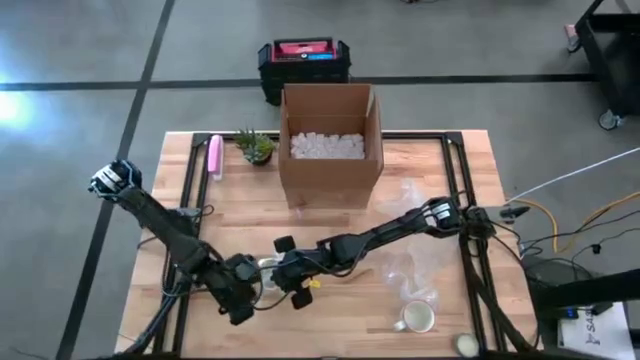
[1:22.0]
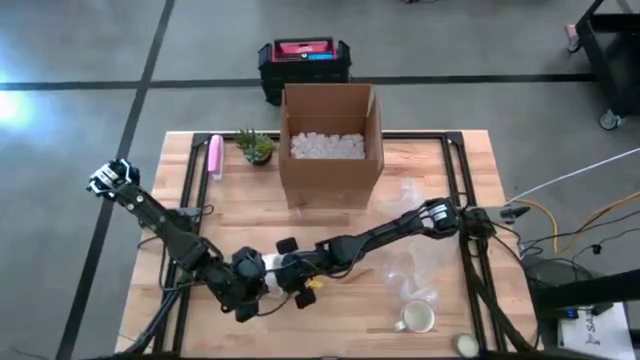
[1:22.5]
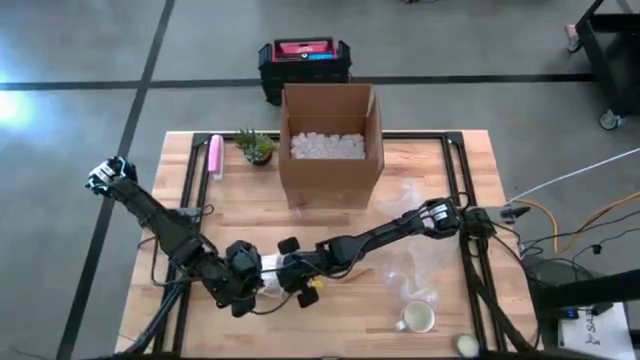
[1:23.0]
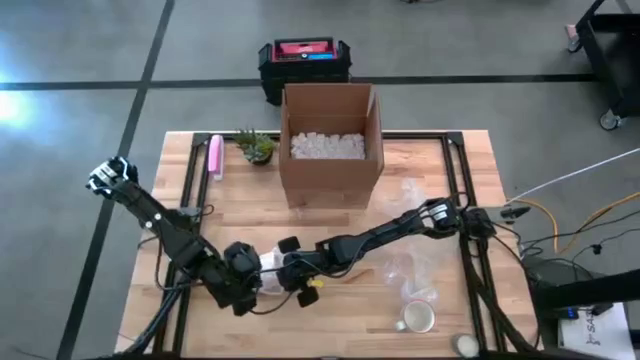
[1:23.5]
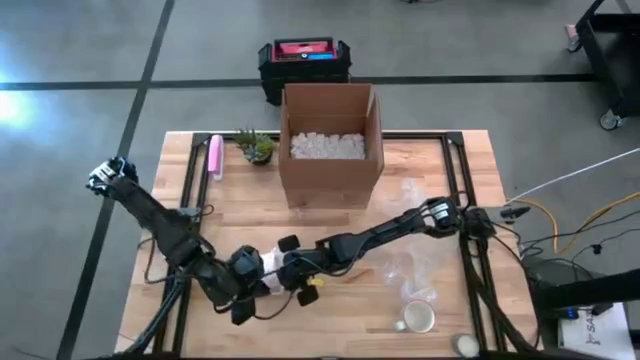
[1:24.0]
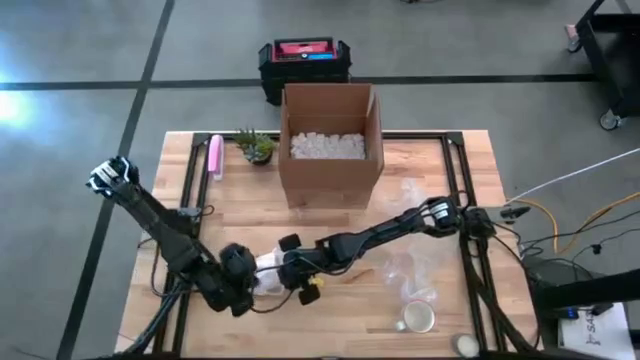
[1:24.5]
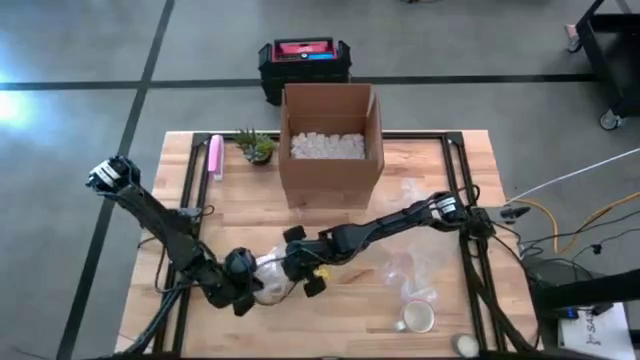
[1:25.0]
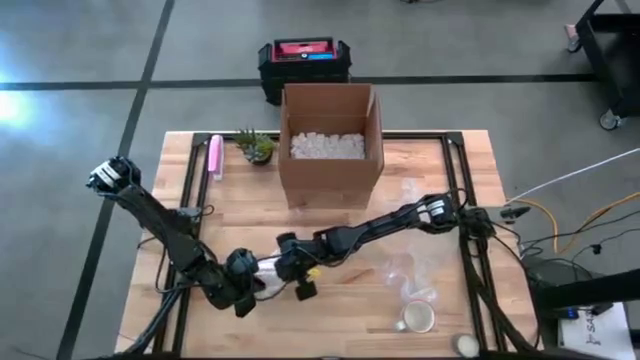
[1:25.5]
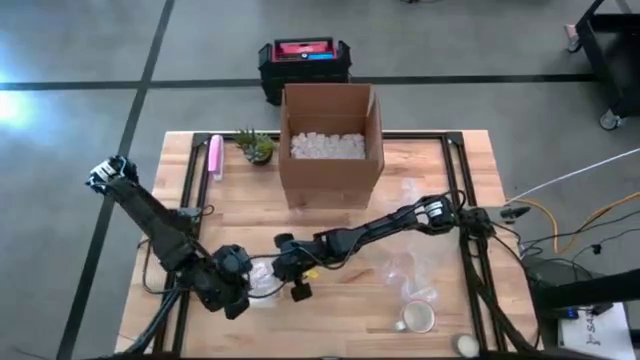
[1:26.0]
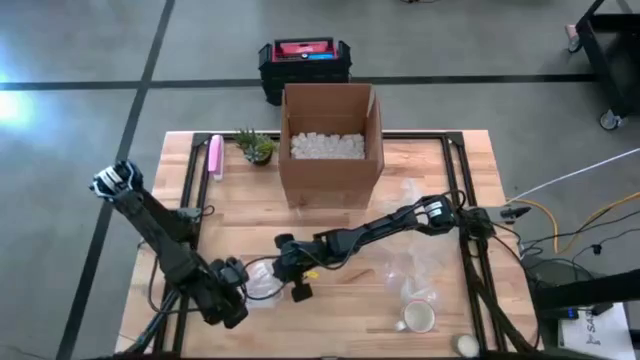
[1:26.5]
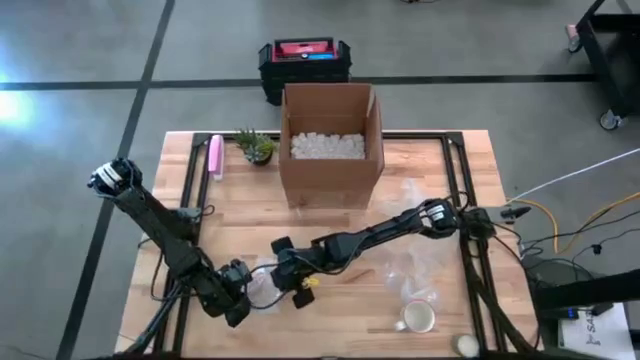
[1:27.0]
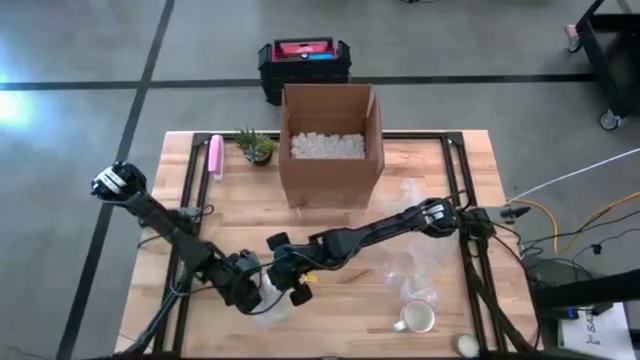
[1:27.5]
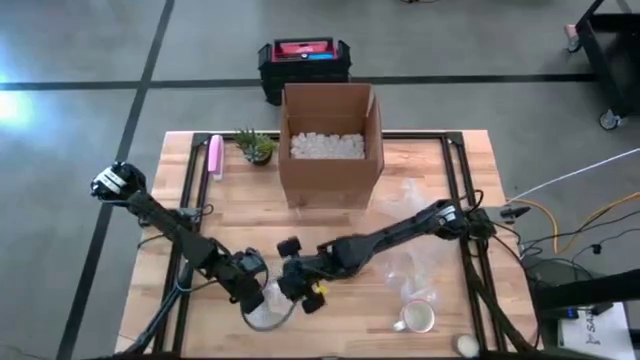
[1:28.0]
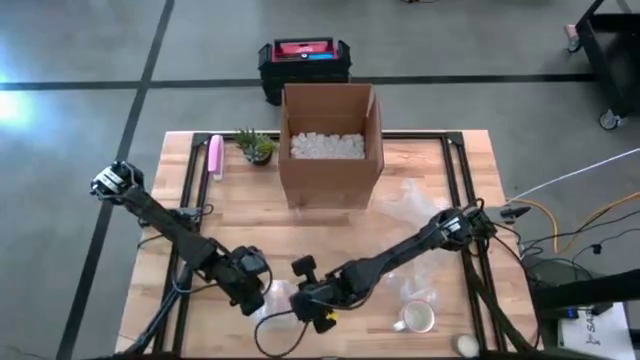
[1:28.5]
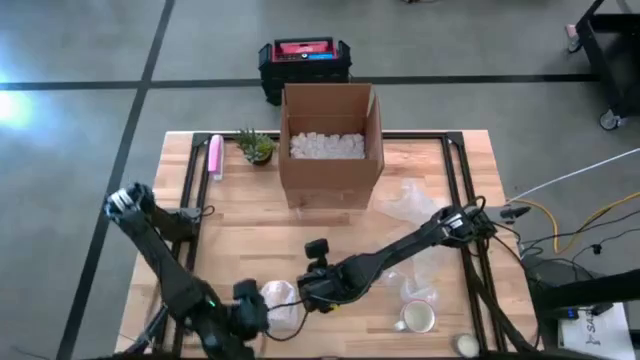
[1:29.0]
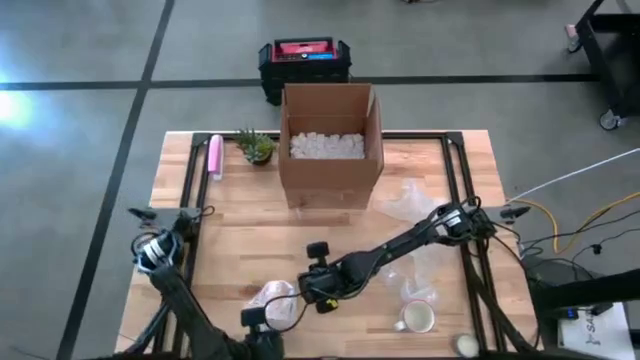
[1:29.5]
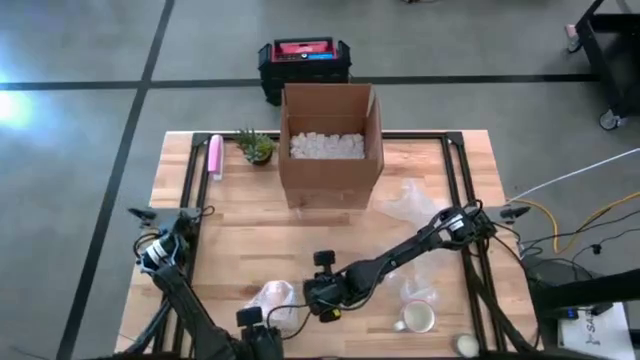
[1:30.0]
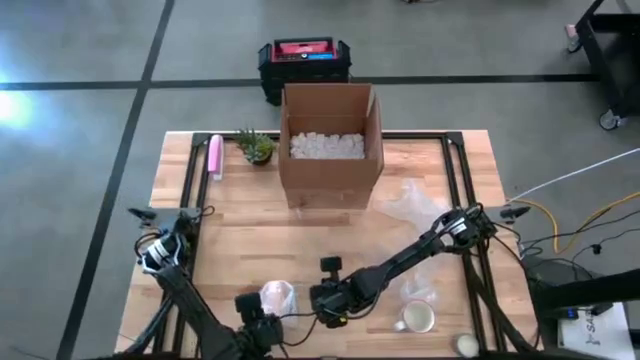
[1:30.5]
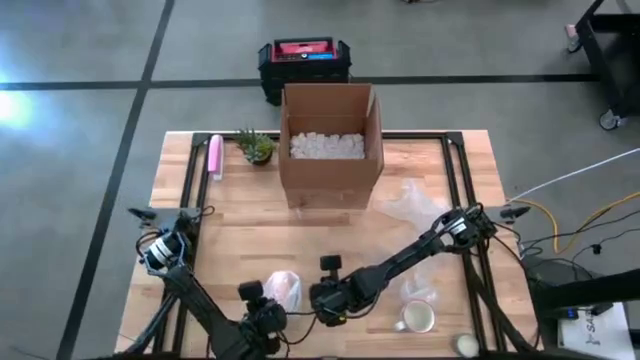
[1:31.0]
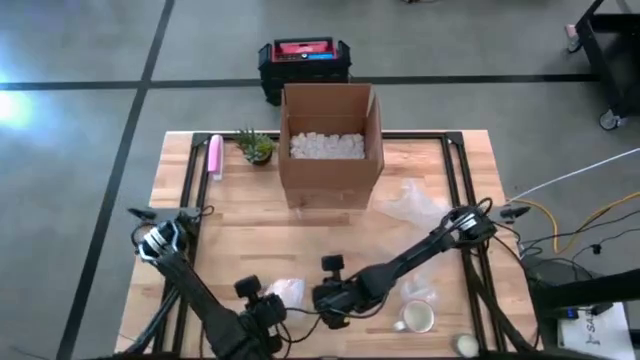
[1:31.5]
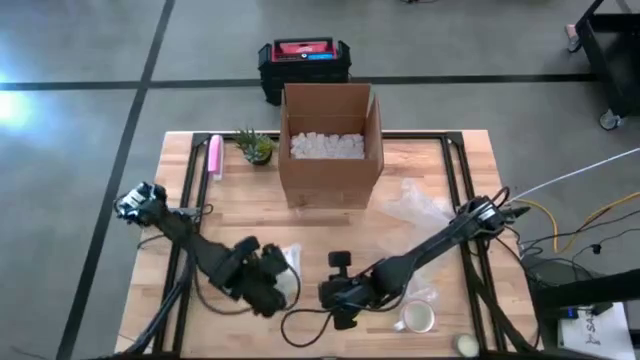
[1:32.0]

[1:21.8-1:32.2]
Task: wrap mug
Wrap the orange mug with the bubble wrap

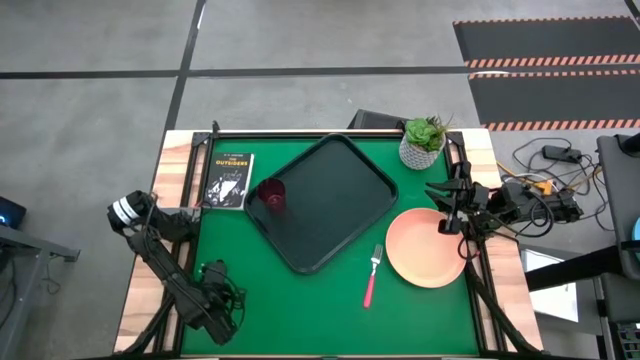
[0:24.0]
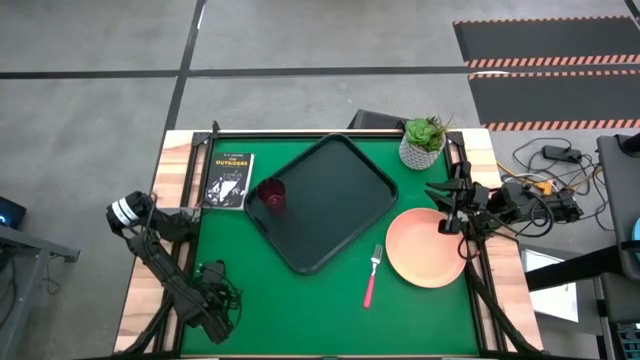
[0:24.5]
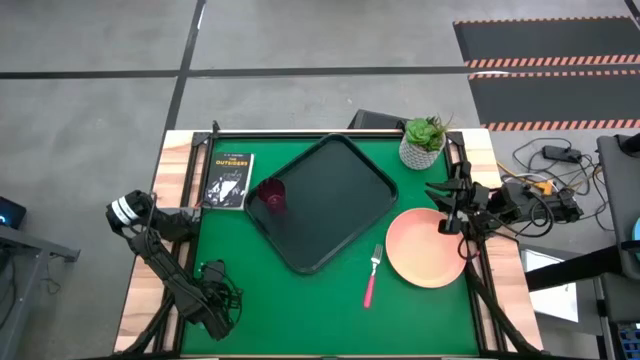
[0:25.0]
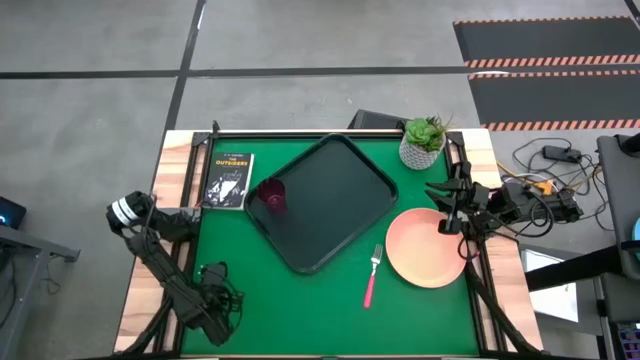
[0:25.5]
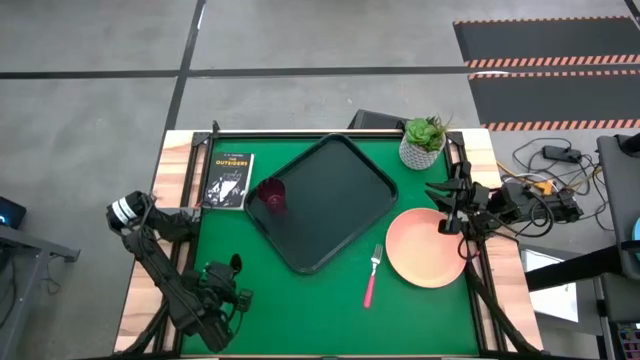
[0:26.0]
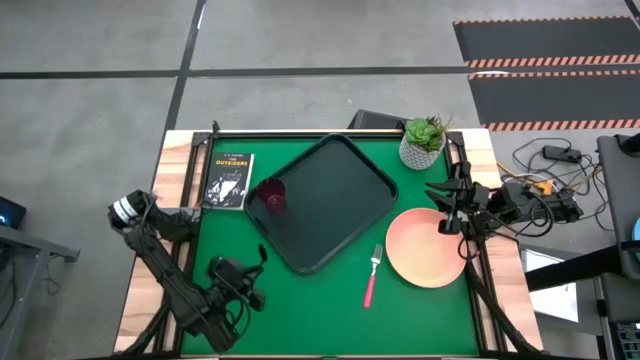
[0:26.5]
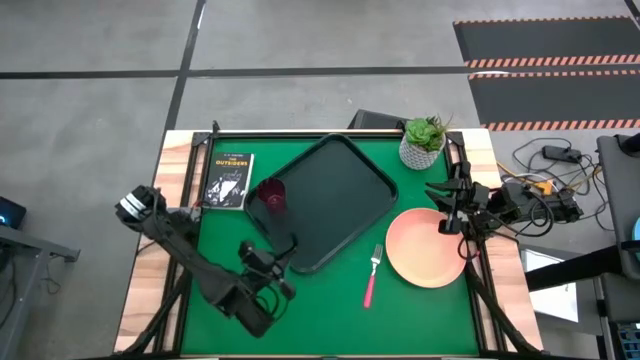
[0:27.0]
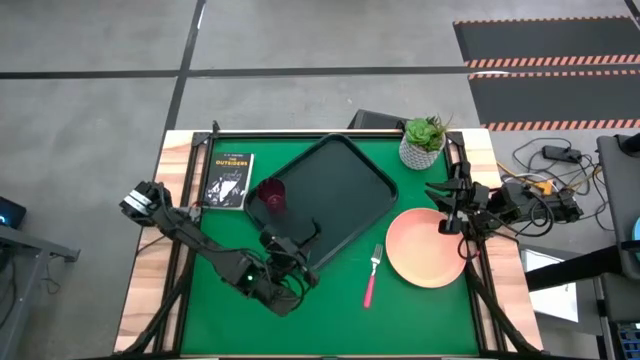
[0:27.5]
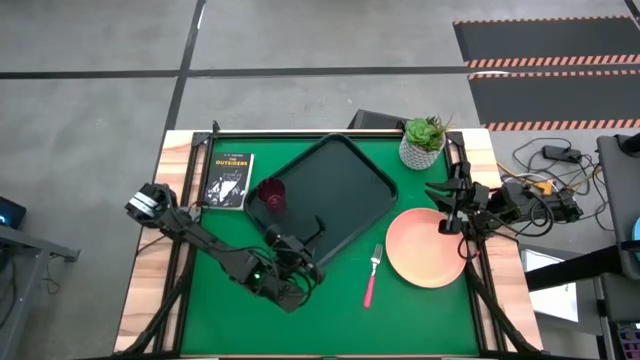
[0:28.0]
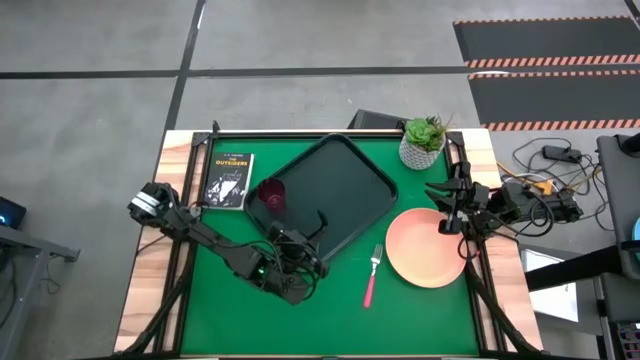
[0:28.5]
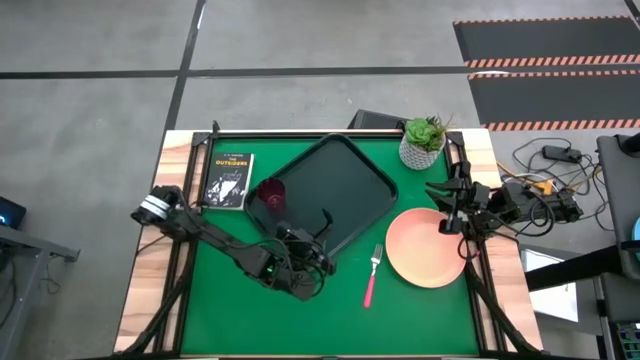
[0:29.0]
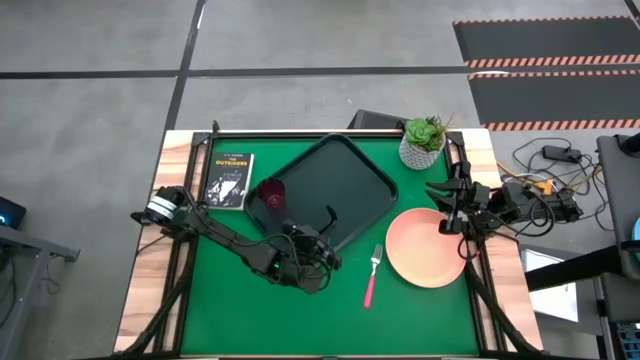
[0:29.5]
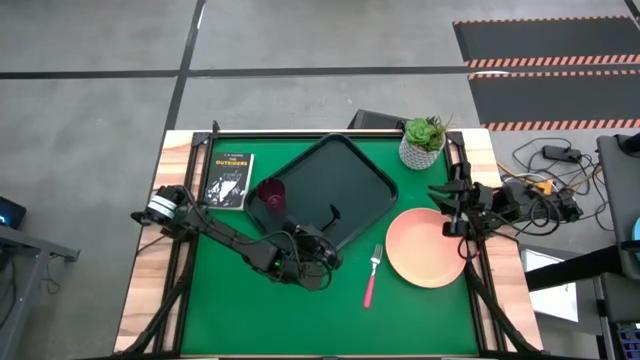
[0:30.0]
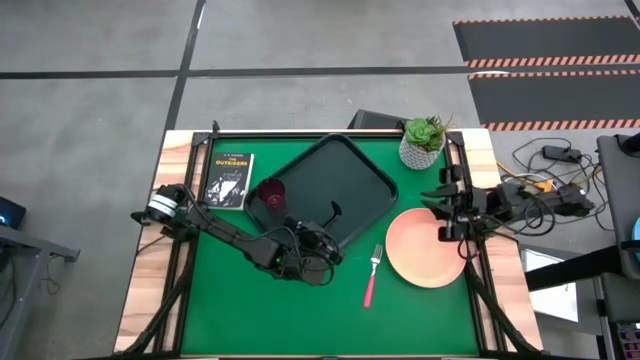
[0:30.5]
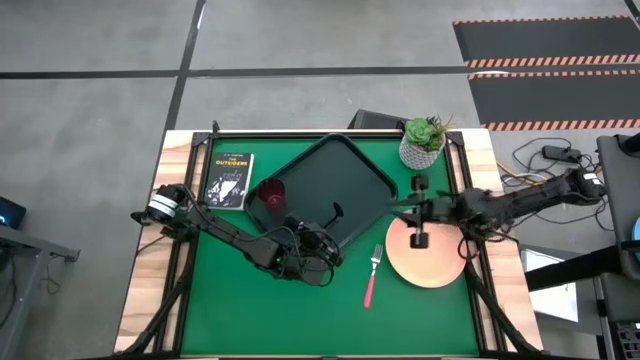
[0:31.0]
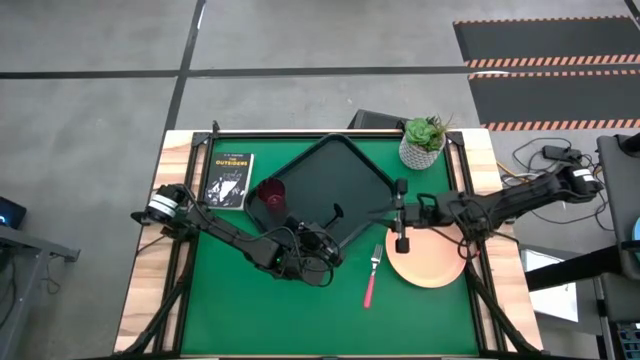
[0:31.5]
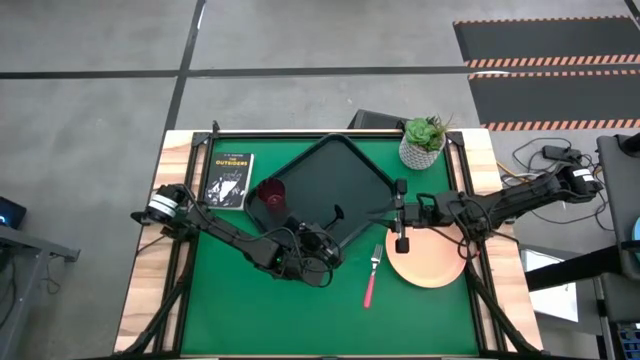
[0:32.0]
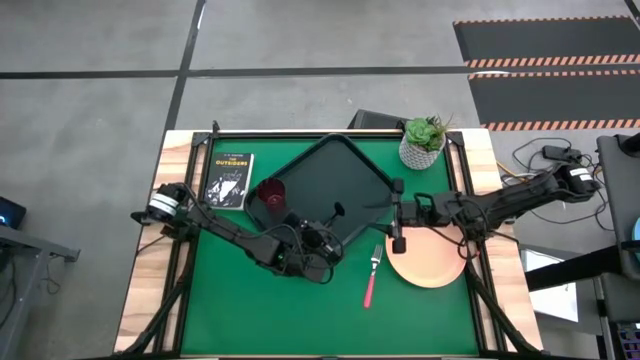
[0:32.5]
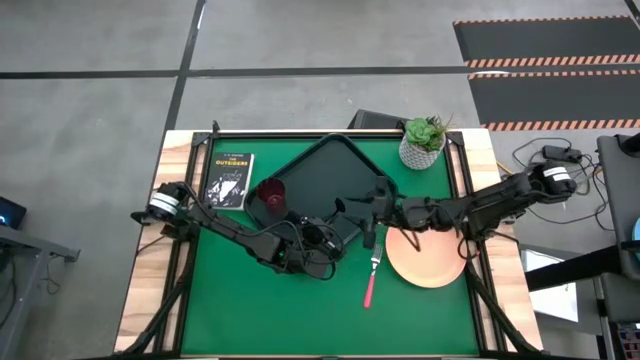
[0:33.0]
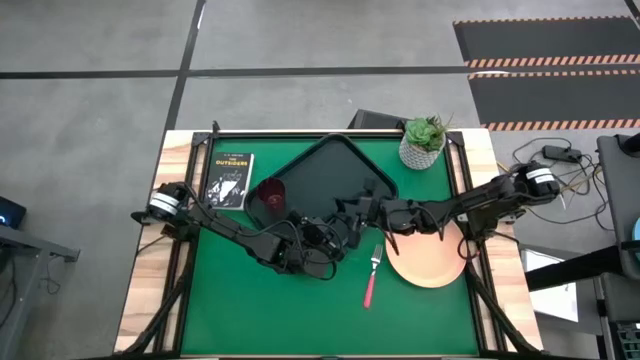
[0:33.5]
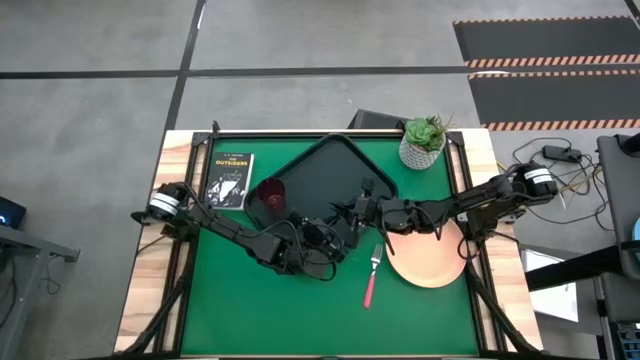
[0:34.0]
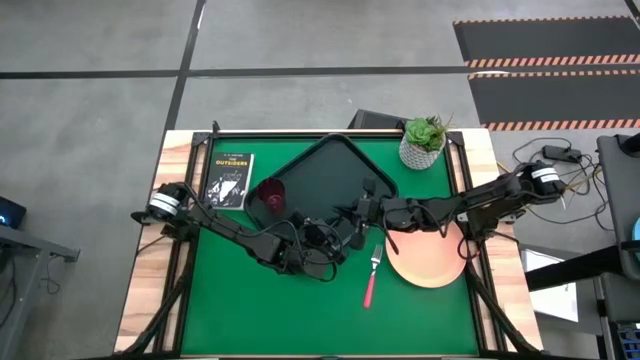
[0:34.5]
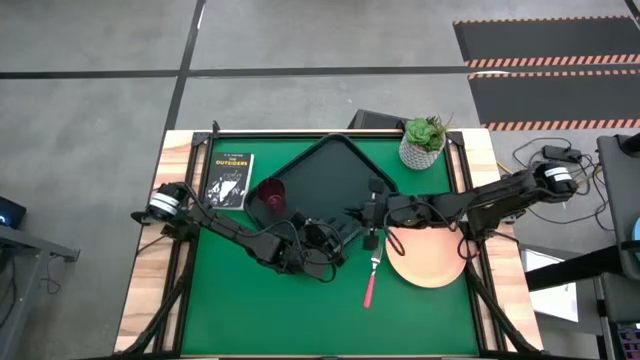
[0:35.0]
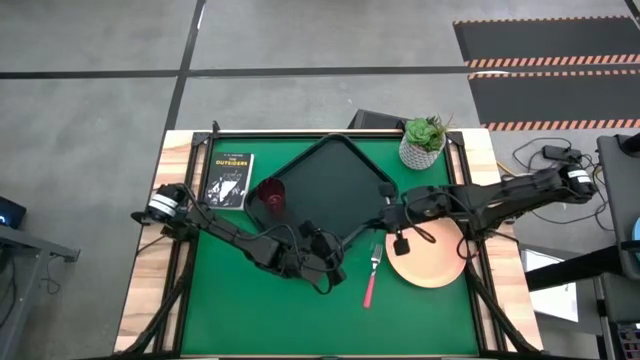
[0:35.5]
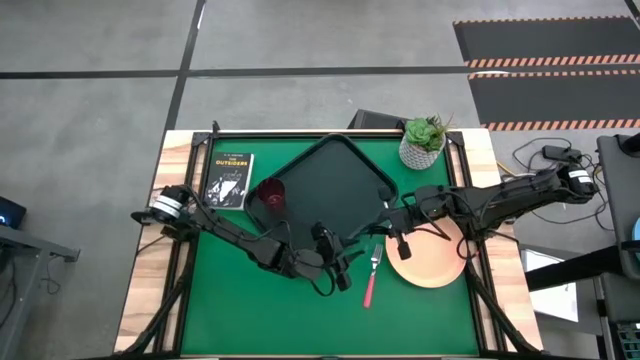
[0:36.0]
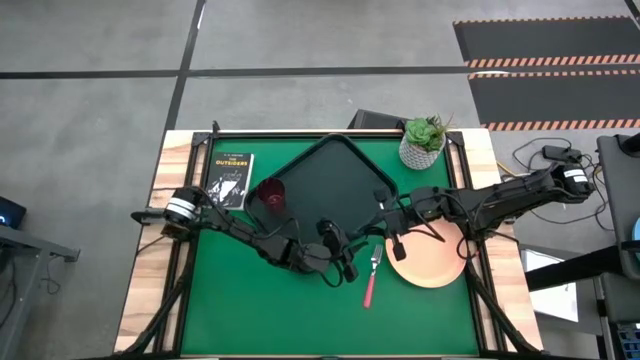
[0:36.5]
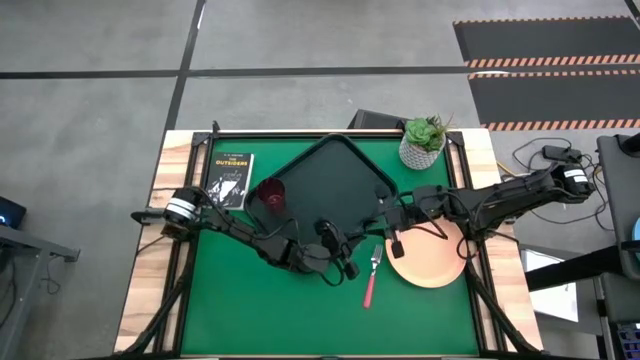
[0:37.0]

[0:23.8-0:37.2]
Task: Pick and place plate/cup/fork/spoon on tray
Put the blue spoon on the black serving tray to the bottom right of the red glass
